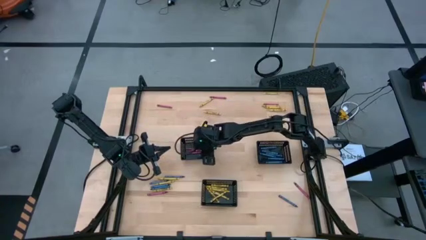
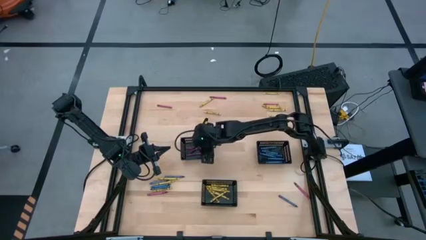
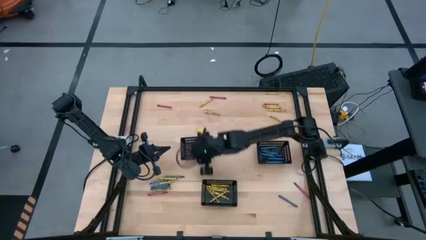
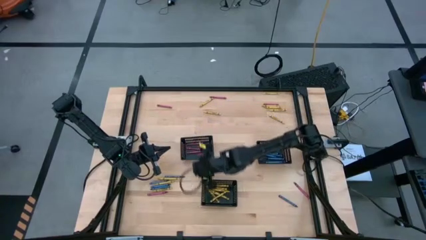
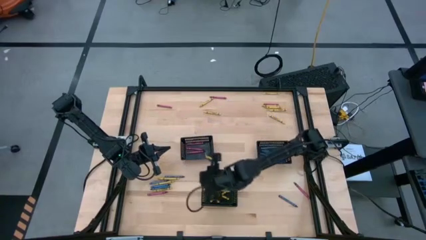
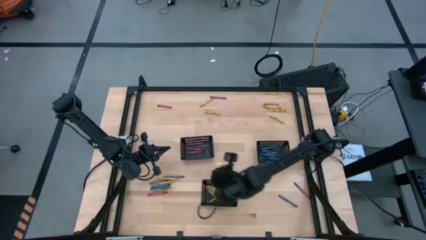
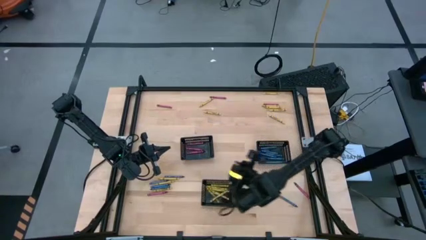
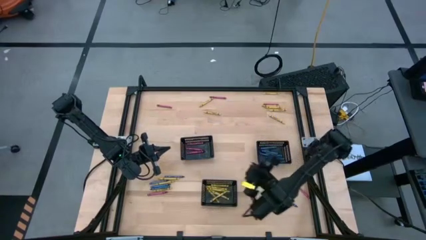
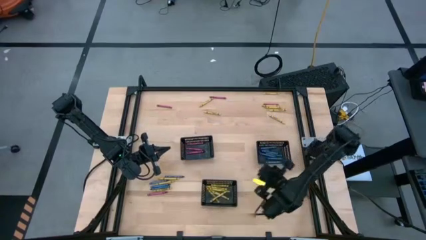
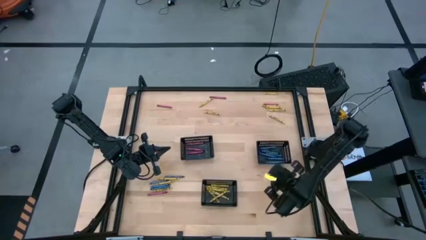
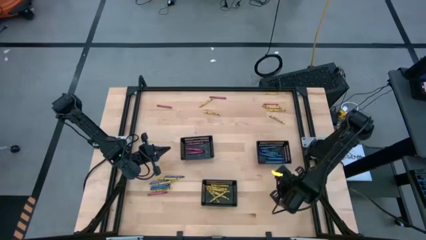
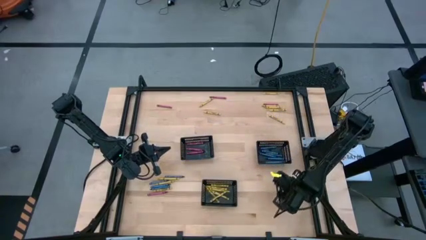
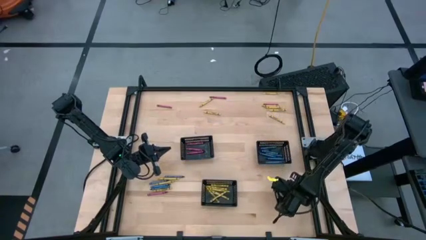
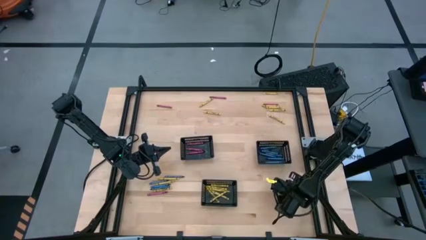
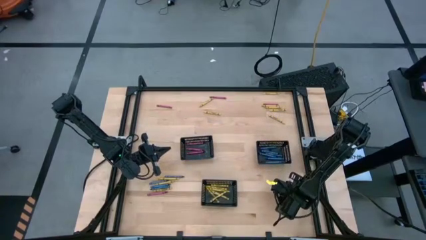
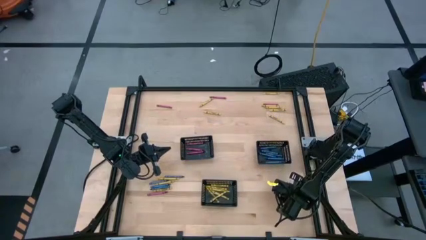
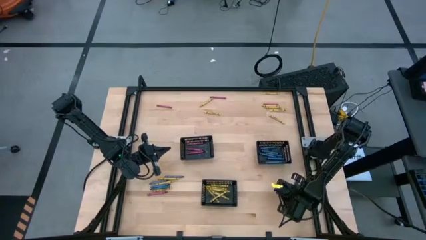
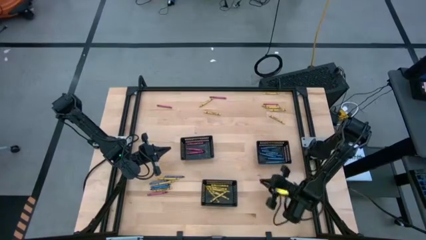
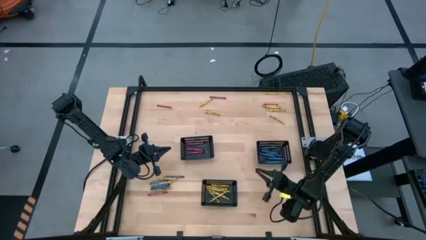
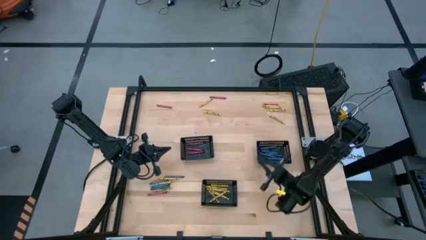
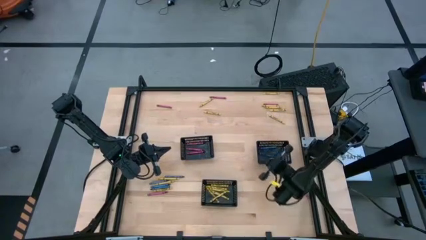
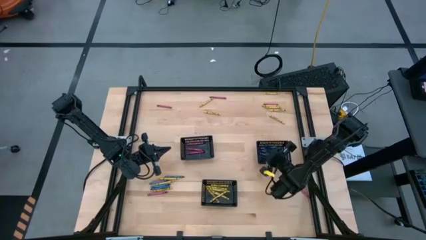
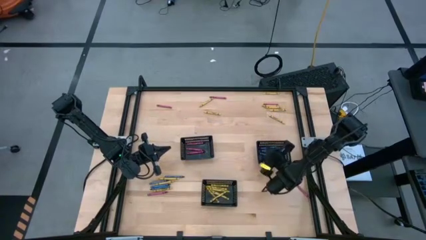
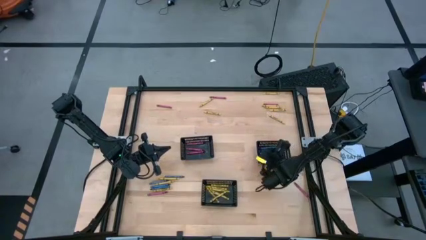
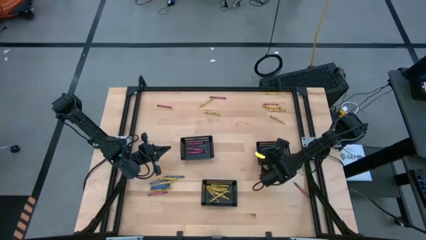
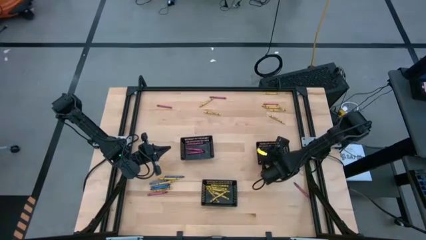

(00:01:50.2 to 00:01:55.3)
Task: Sort crayons
Put the blue crayon into the right black bin

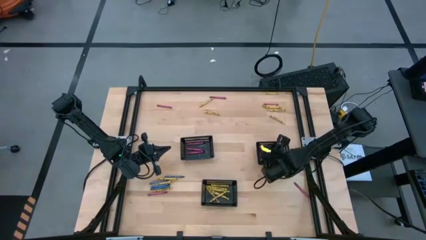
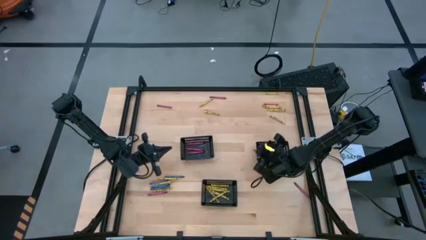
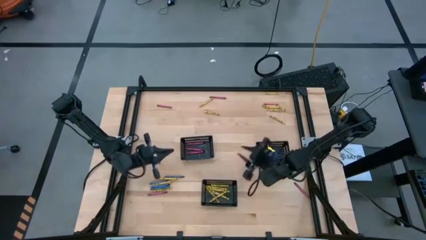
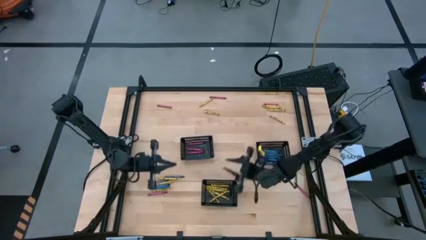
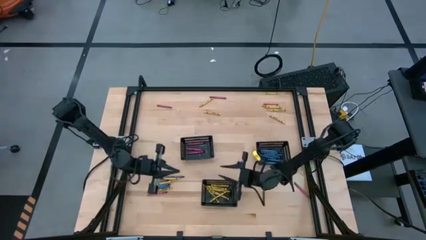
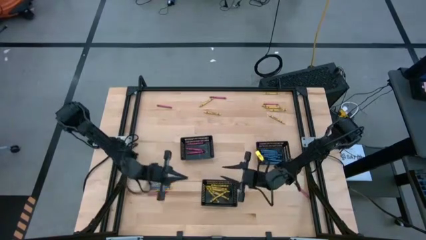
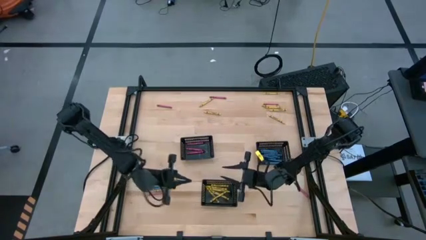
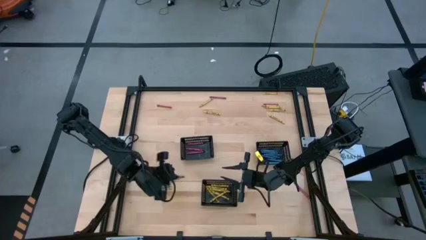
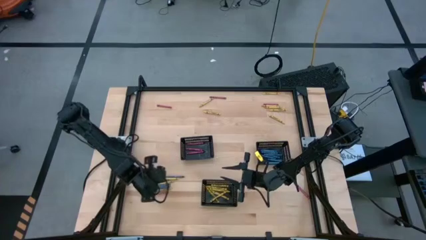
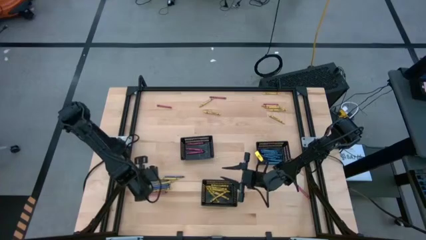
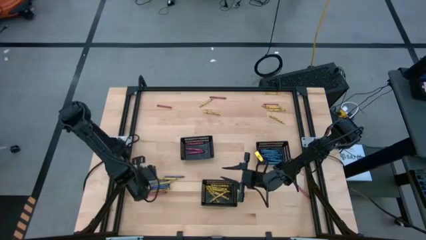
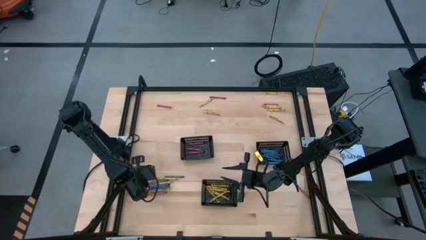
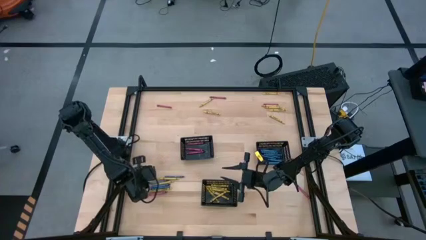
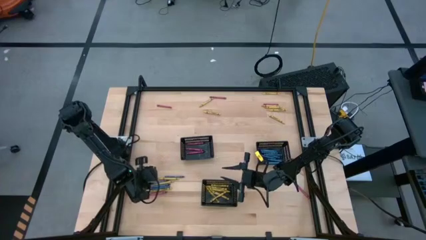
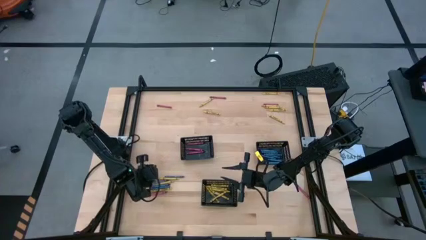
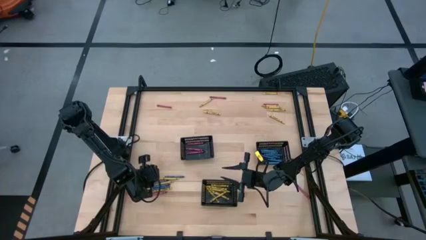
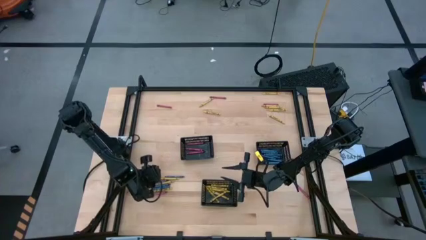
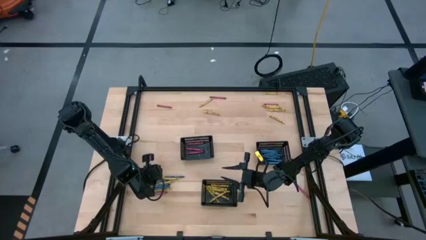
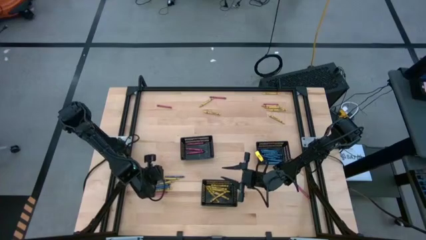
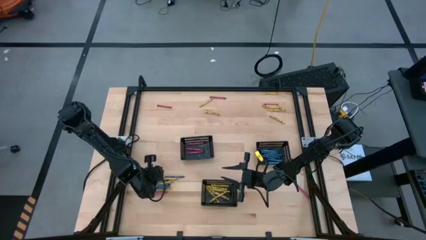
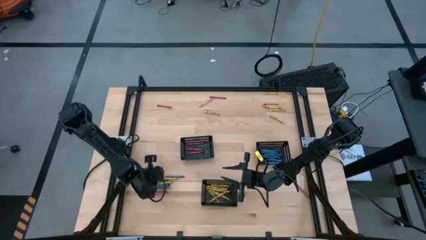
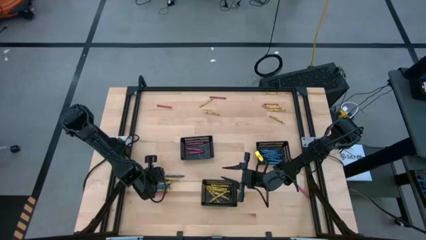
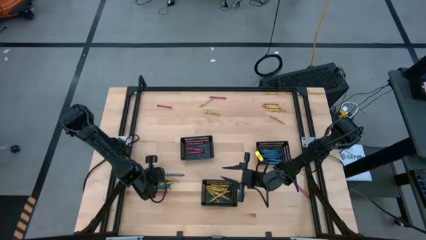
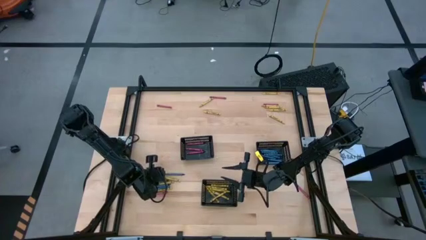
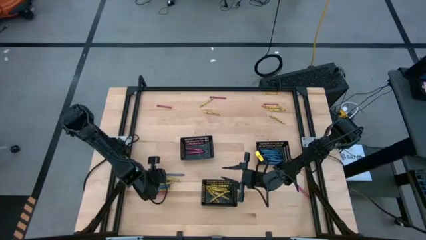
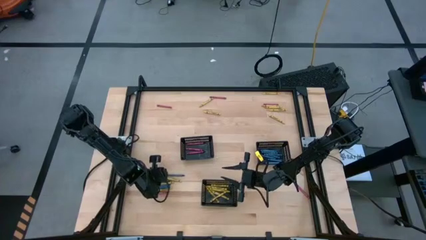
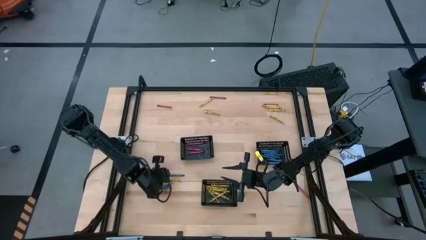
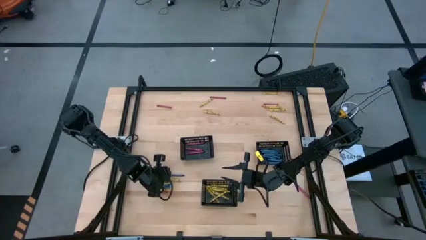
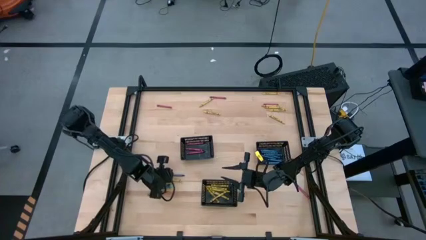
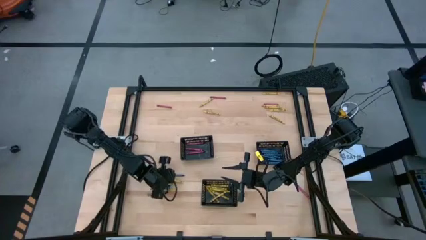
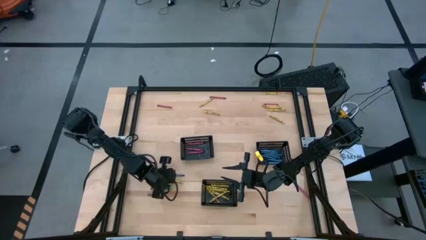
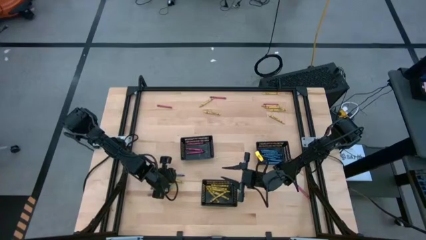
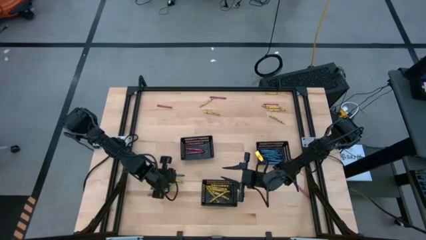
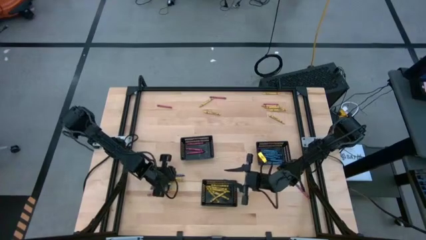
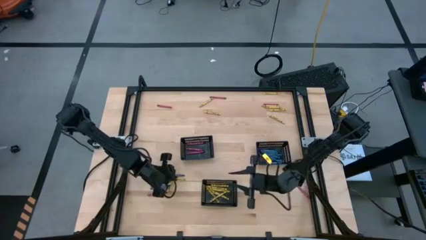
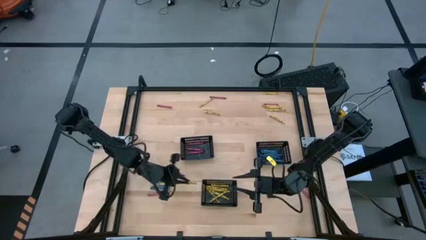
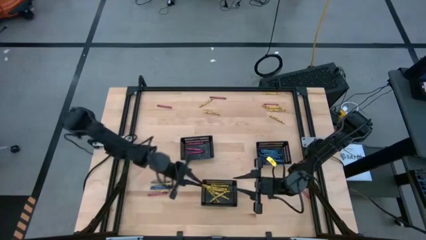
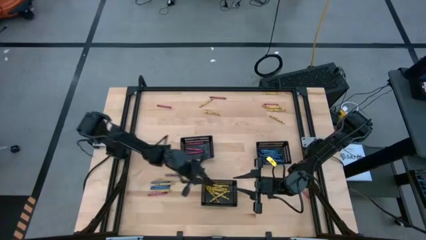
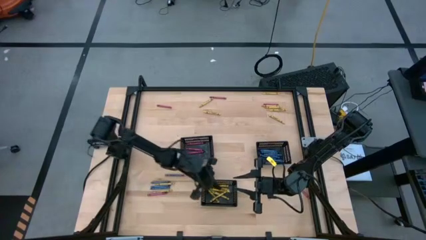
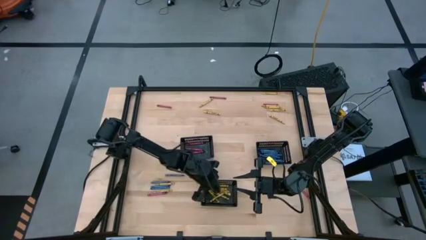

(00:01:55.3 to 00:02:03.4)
Put the yellow crayon into the bottom black bin

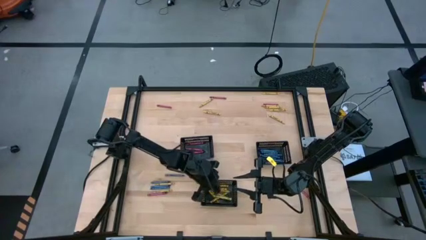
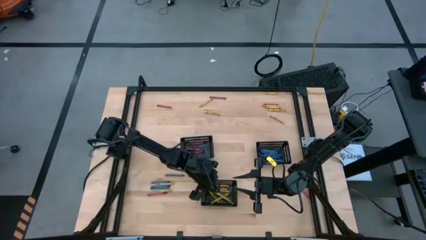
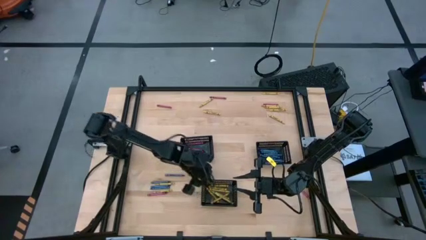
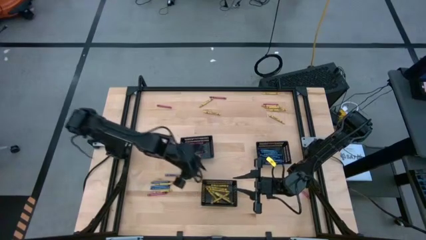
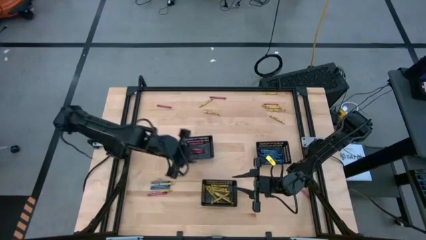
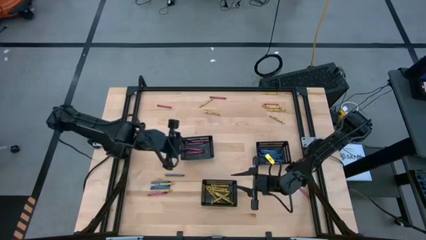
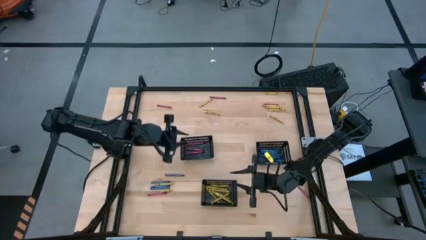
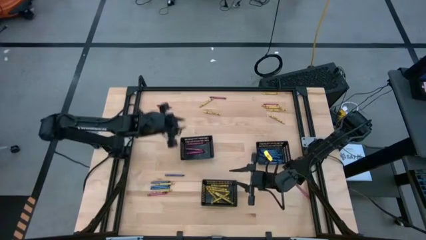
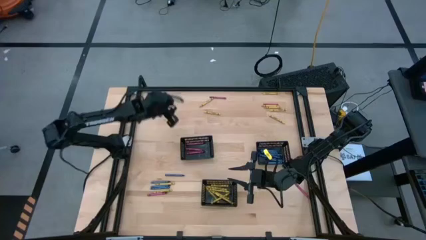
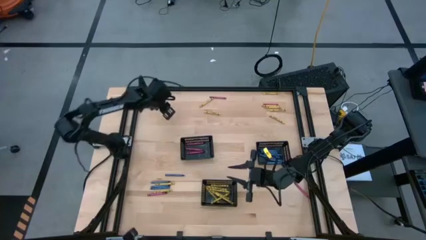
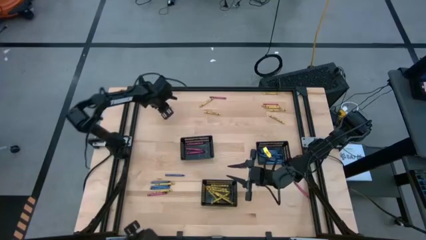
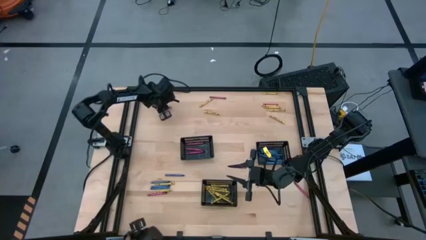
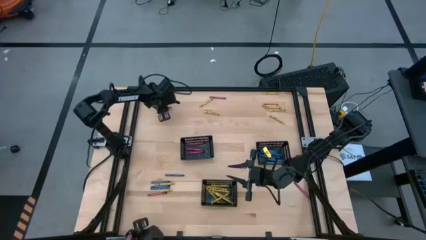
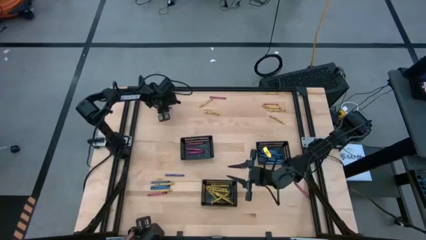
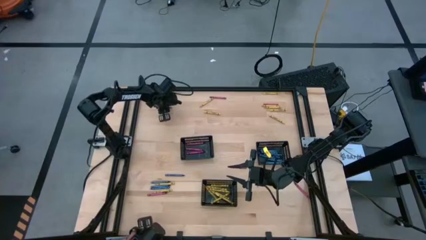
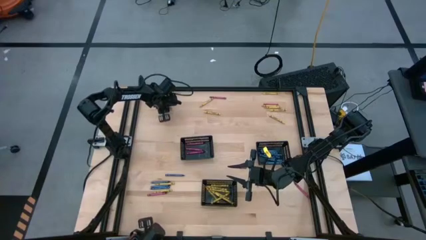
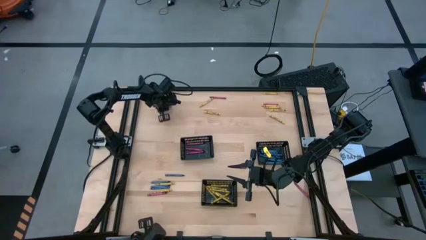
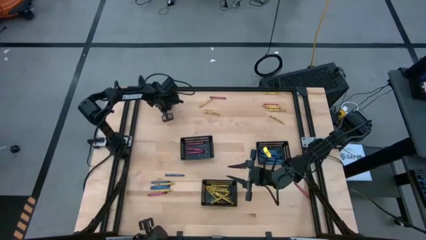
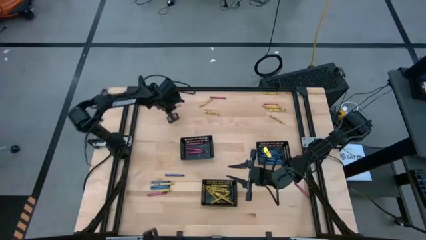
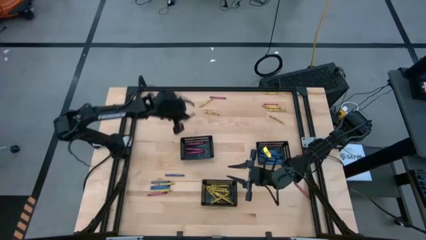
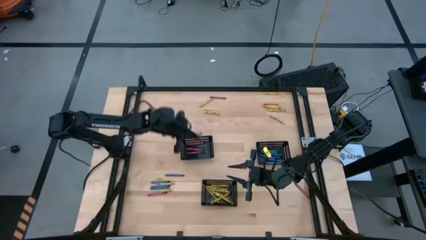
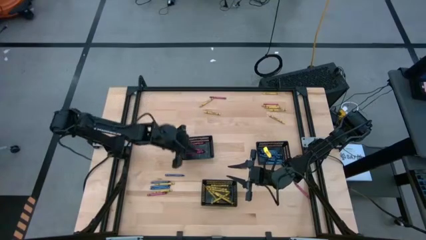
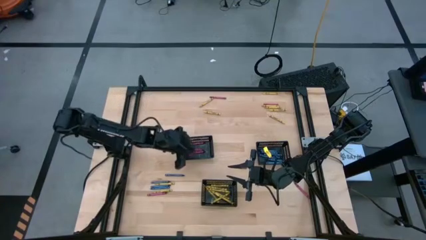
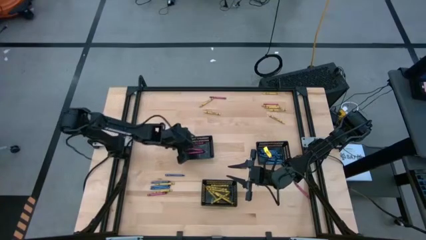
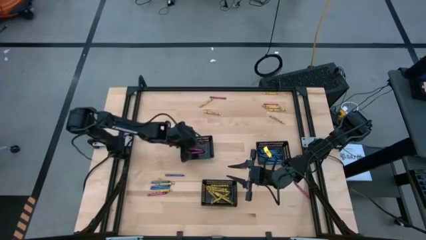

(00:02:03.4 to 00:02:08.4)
Put the red crayon into the left black bin
